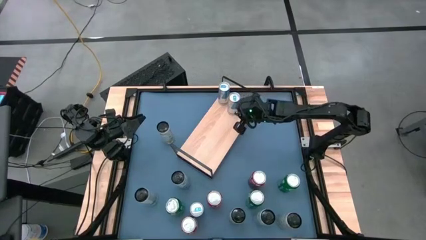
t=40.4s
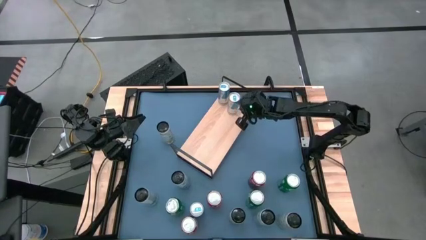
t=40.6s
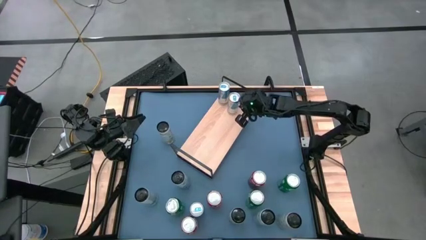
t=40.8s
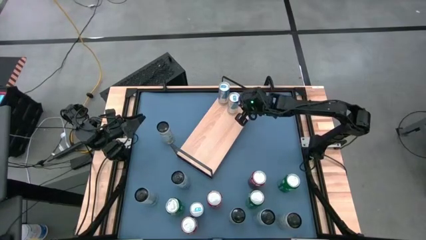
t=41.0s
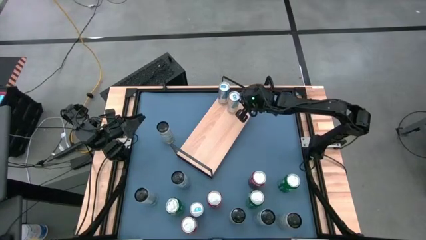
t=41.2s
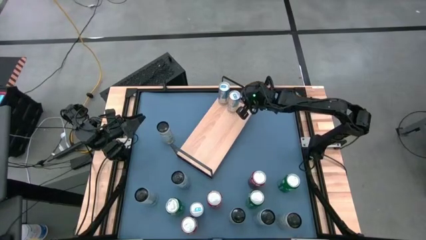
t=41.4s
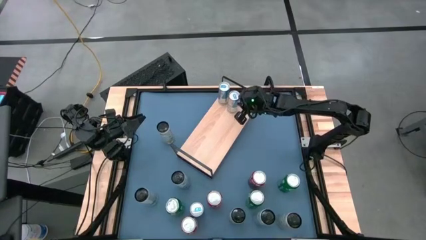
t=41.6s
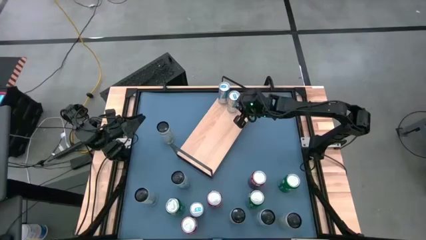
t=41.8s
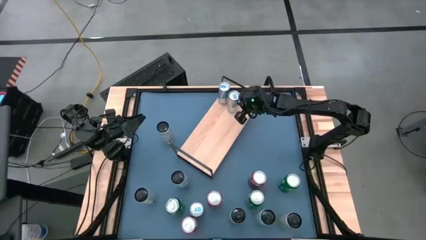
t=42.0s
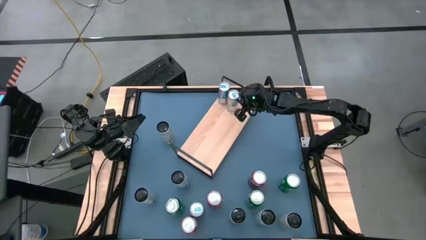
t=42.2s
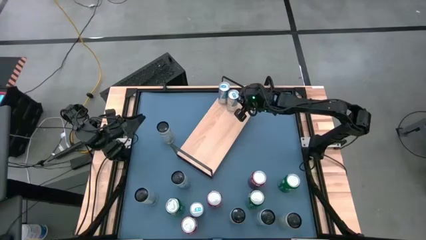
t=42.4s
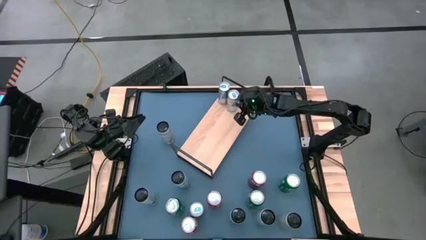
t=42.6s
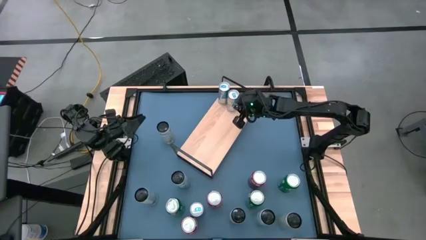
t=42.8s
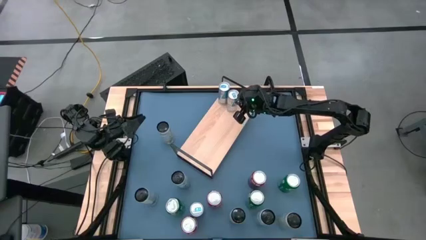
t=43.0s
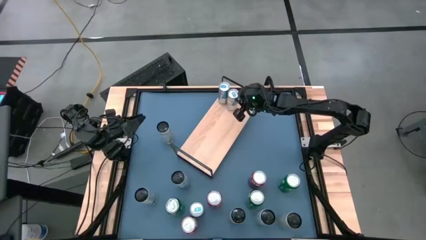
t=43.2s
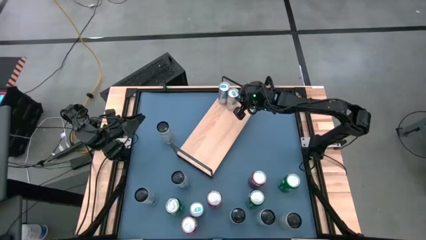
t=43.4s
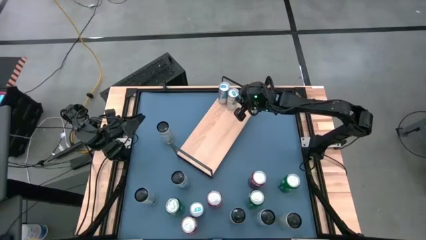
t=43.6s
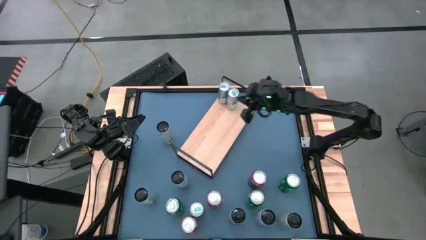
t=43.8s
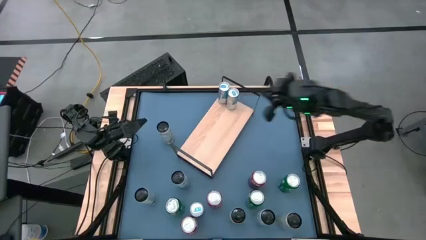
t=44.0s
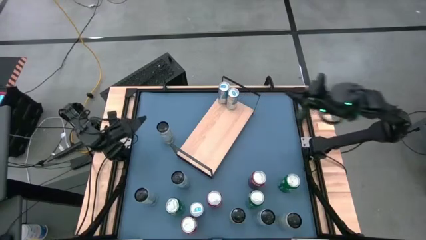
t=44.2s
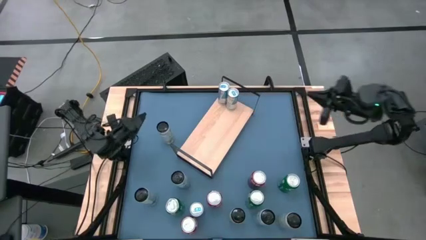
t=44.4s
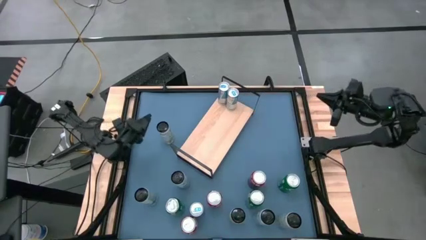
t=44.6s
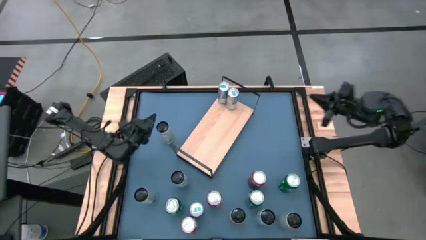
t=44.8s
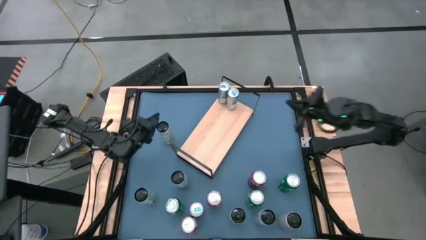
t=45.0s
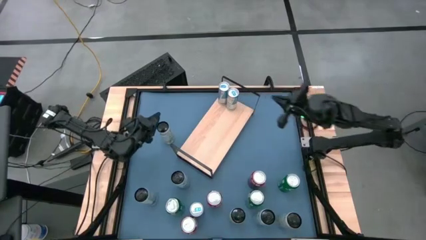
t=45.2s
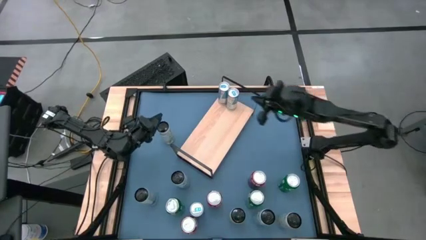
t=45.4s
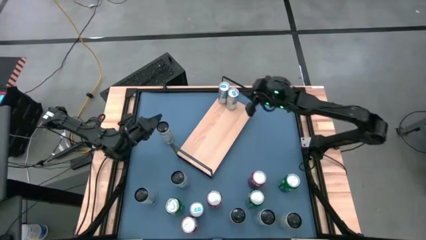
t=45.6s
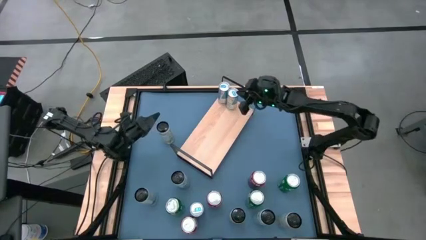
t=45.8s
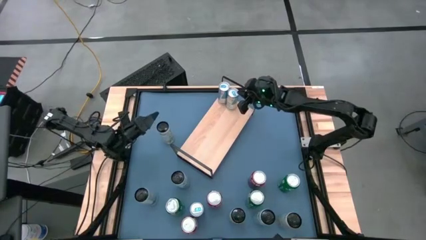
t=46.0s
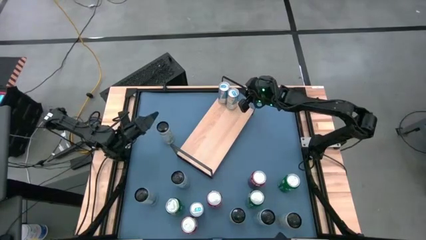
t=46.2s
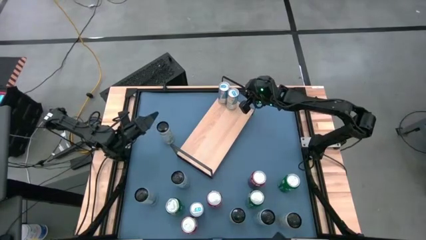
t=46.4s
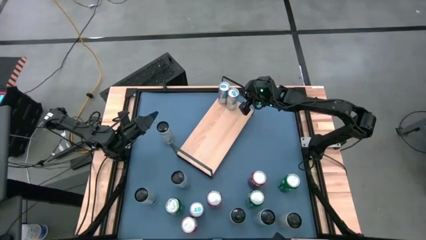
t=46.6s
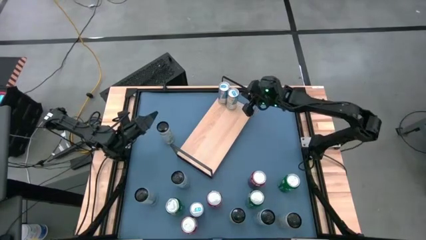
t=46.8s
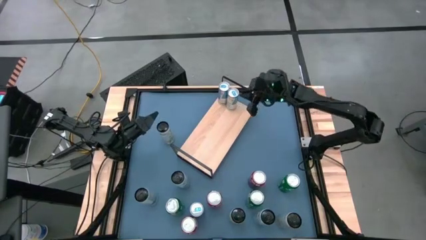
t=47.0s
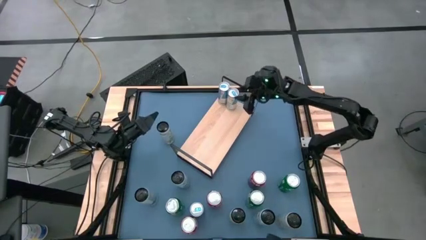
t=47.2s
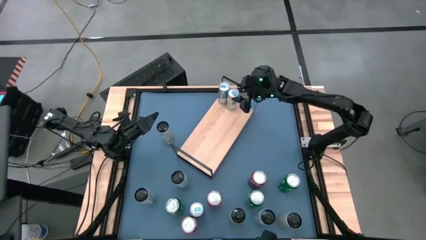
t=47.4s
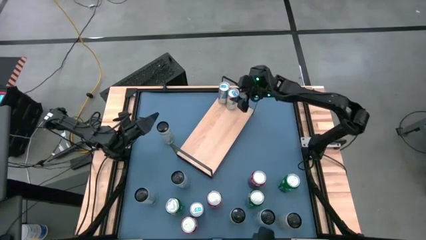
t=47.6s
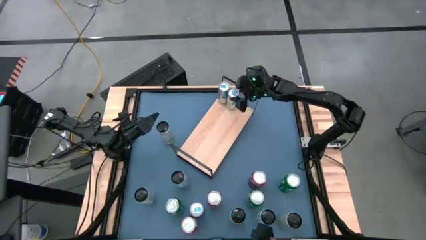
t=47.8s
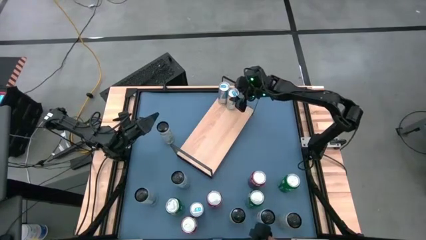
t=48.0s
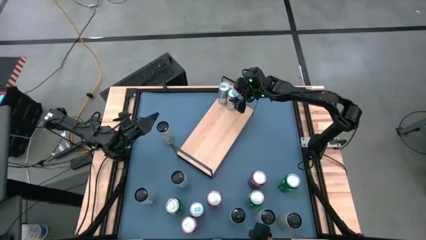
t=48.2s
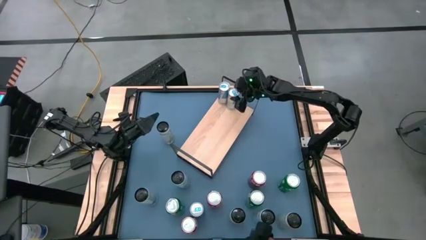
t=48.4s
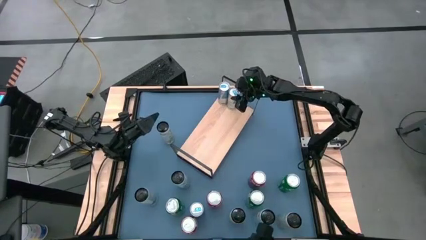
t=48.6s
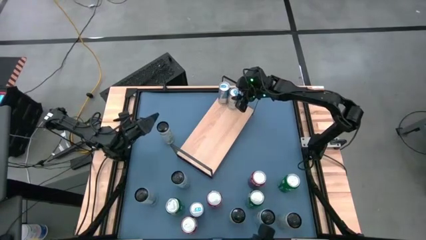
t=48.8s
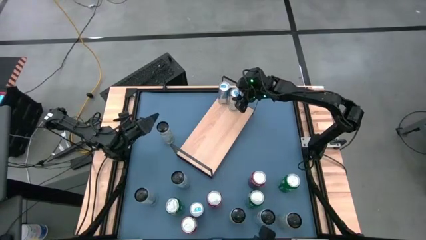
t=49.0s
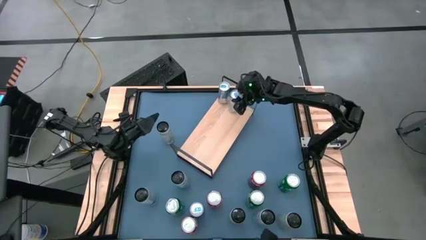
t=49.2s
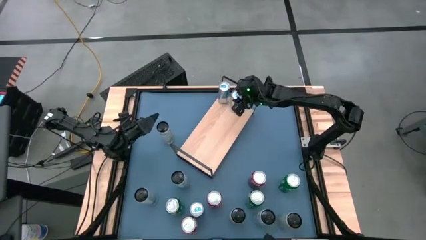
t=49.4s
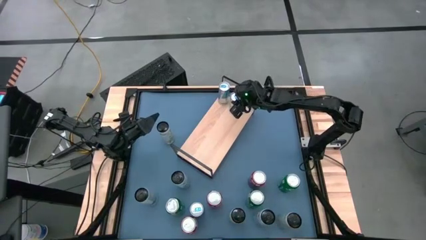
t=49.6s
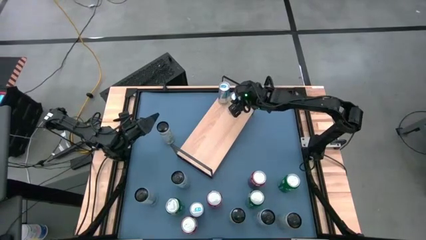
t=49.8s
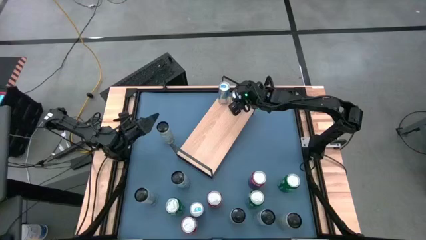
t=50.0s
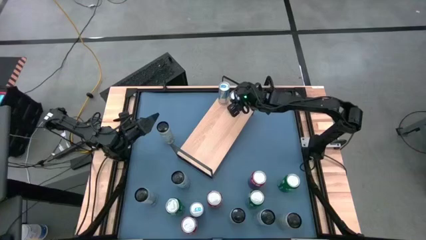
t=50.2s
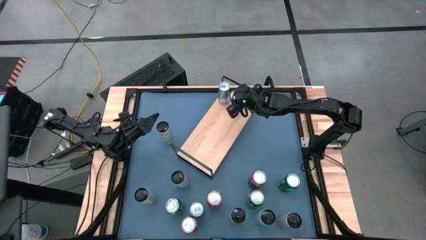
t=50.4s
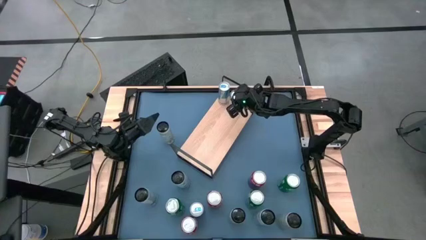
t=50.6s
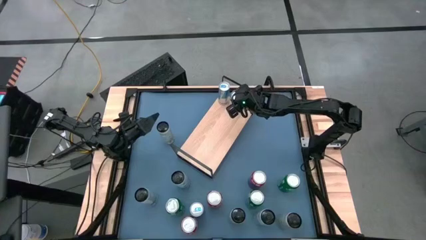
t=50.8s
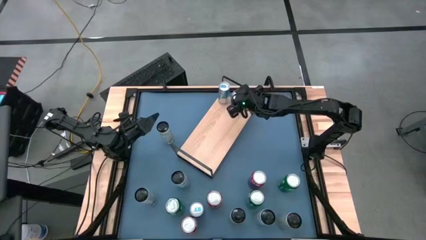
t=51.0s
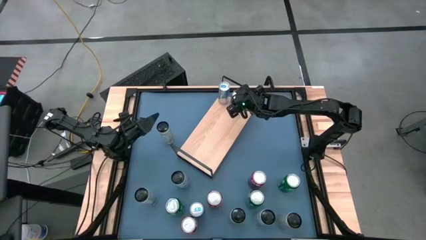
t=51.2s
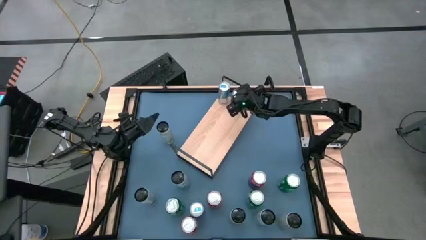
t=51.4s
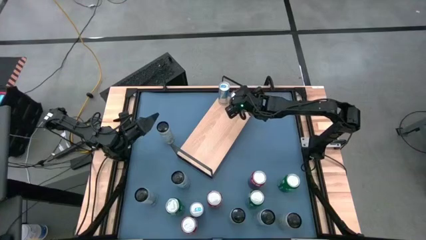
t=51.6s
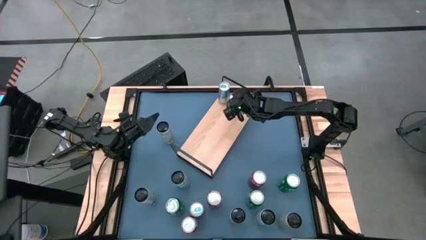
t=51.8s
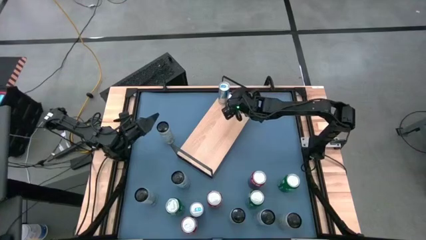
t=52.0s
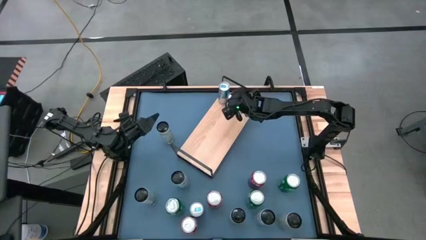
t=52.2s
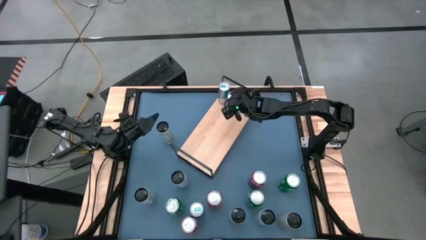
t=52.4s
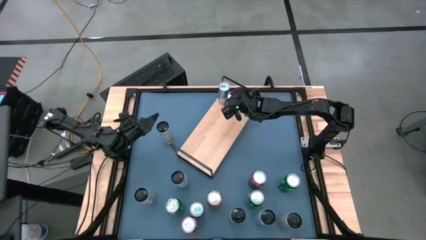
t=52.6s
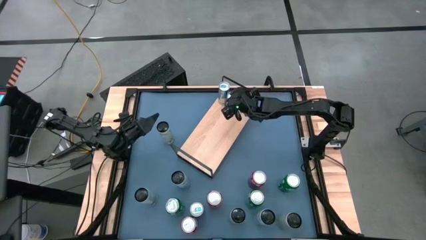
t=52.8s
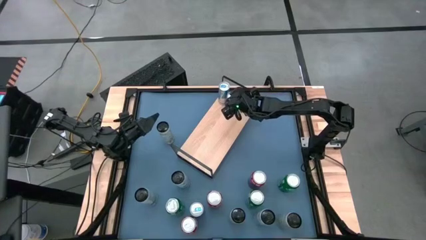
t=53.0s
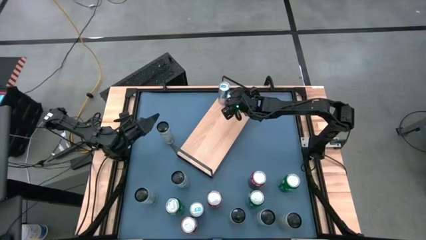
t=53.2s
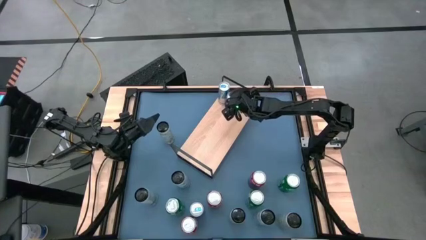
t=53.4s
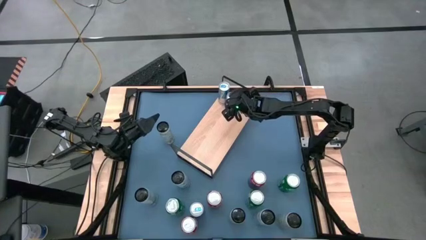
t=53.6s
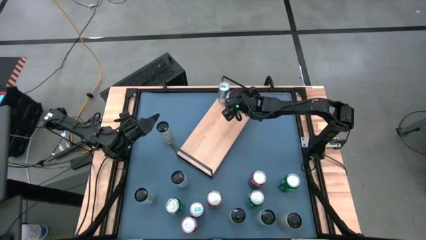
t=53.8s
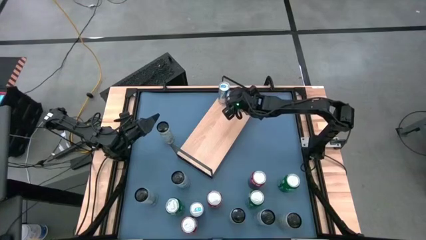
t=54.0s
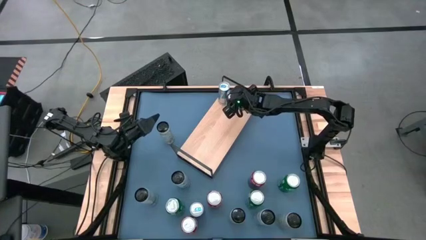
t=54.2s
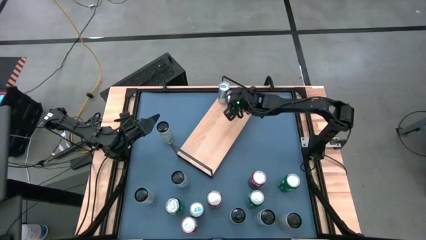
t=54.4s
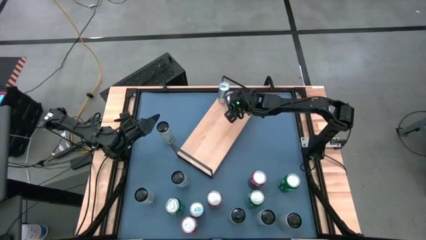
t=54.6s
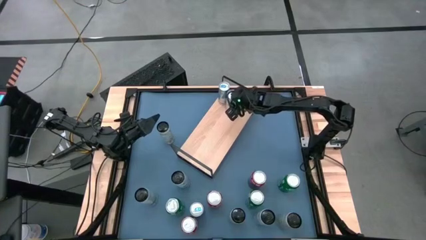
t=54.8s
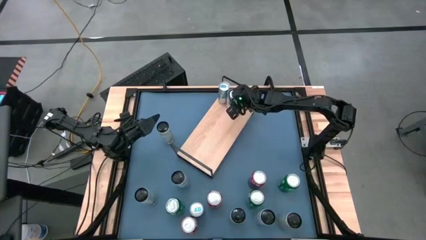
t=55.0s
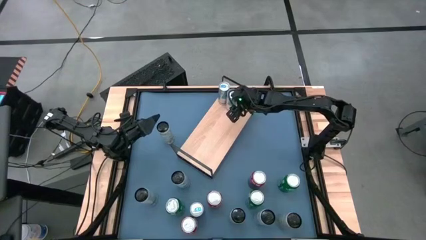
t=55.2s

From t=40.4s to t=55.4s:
Task: Place canned beverage on shelf
Put right blue soda can on the shelf aligned with the other blue soda can
